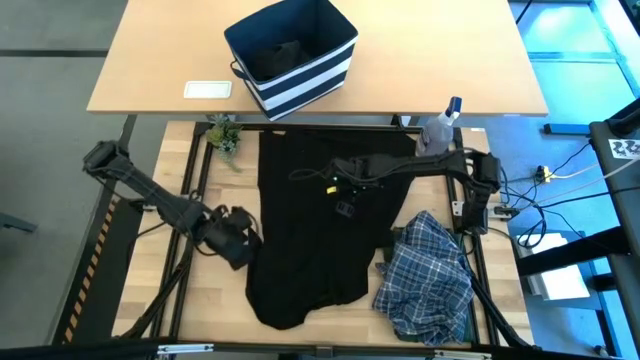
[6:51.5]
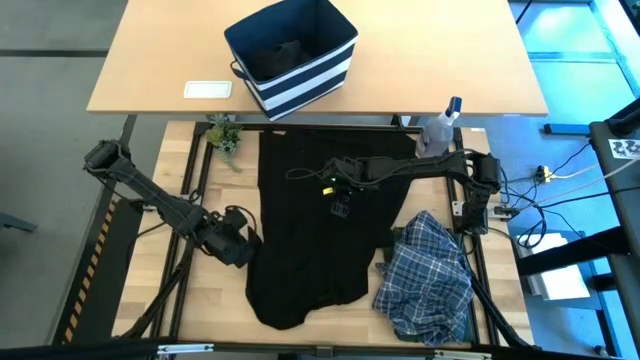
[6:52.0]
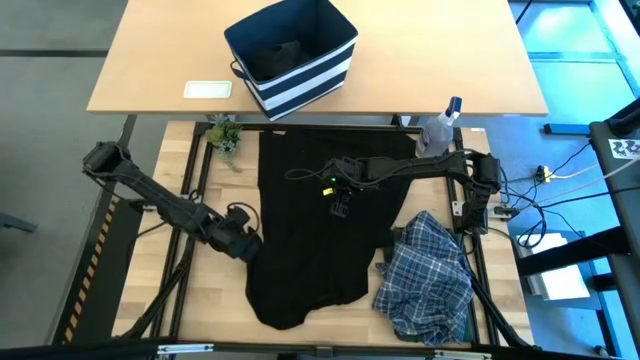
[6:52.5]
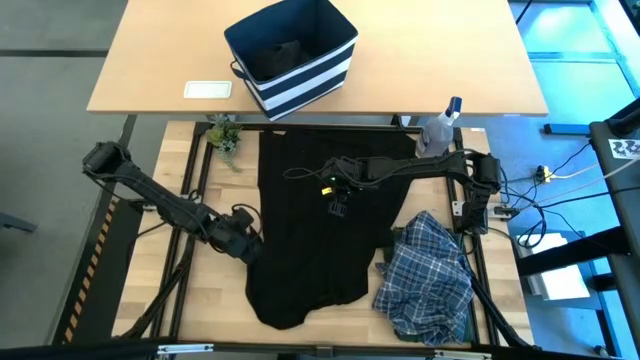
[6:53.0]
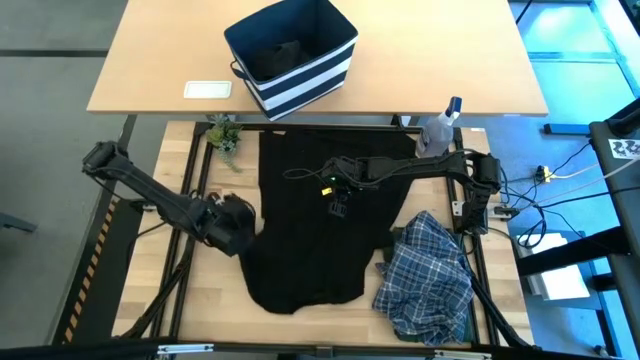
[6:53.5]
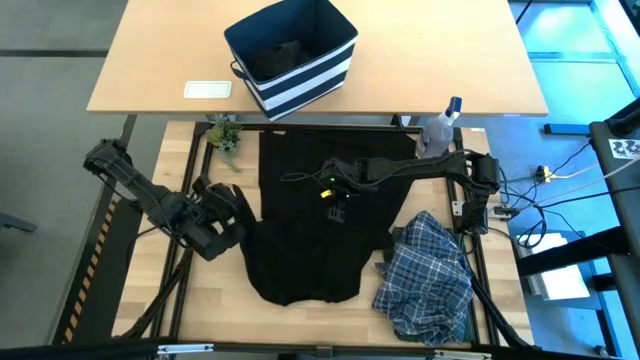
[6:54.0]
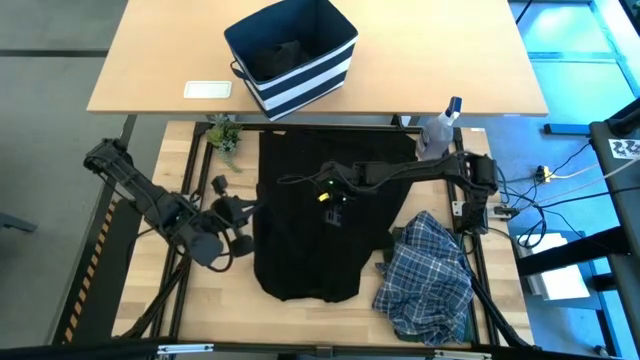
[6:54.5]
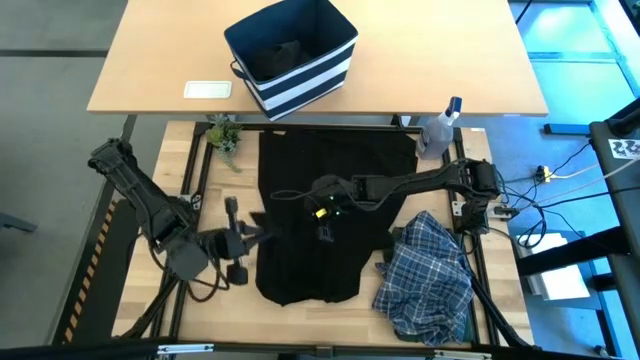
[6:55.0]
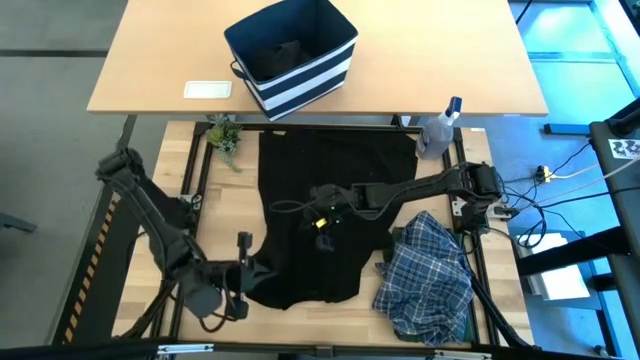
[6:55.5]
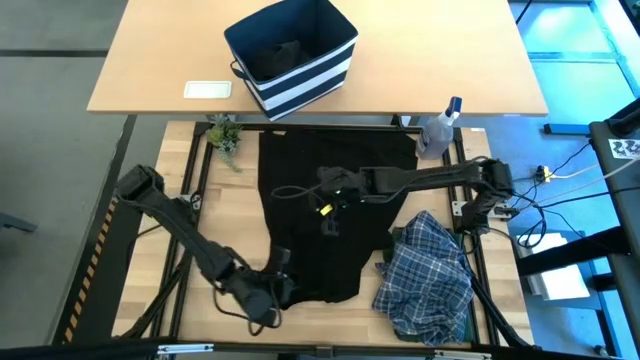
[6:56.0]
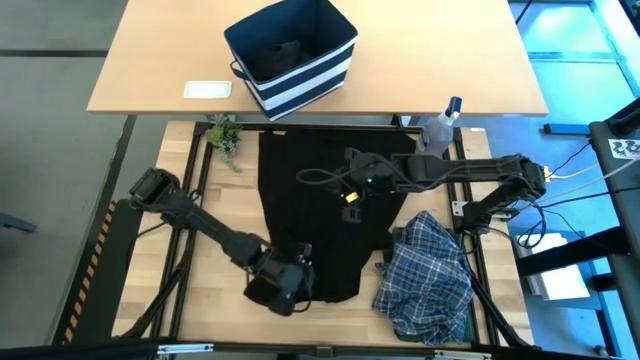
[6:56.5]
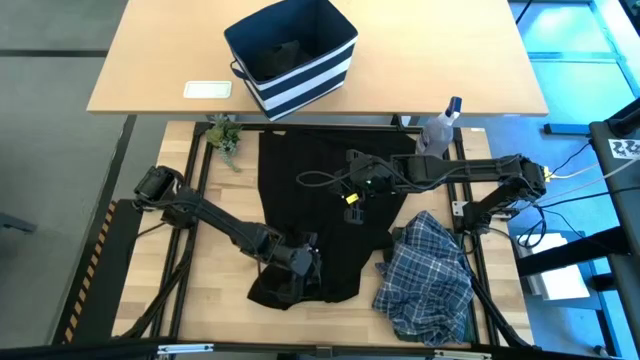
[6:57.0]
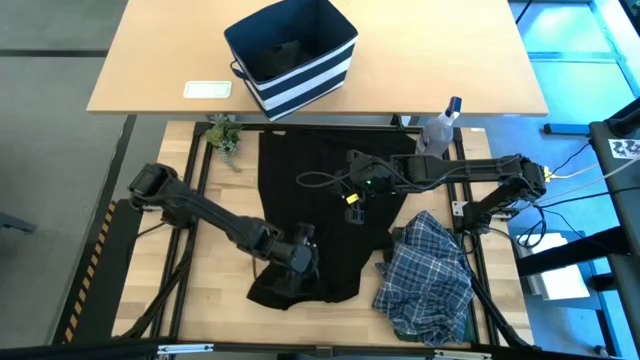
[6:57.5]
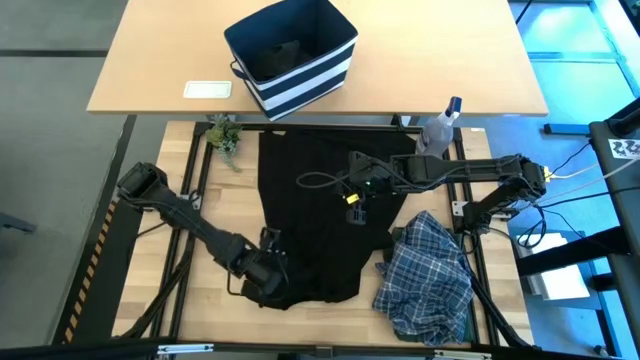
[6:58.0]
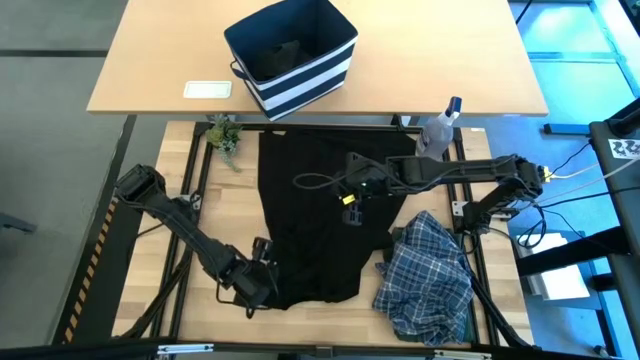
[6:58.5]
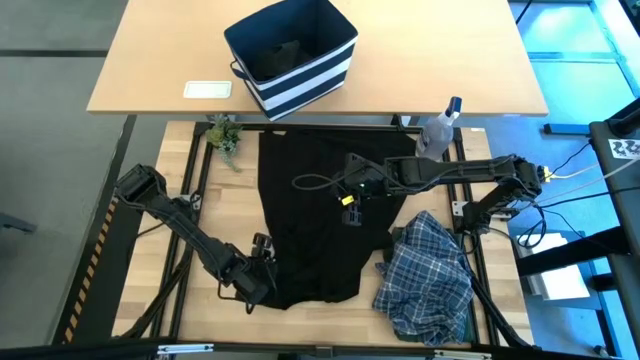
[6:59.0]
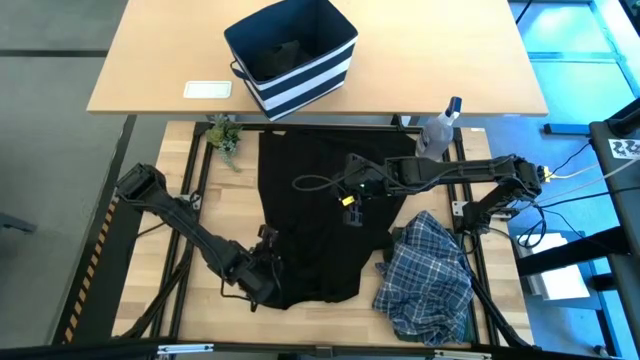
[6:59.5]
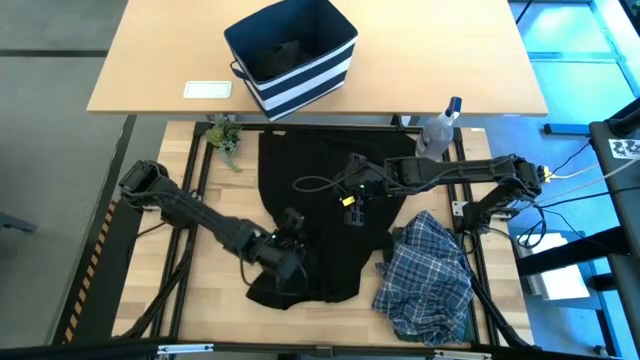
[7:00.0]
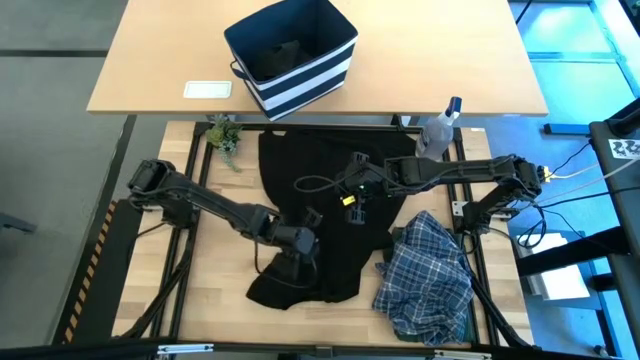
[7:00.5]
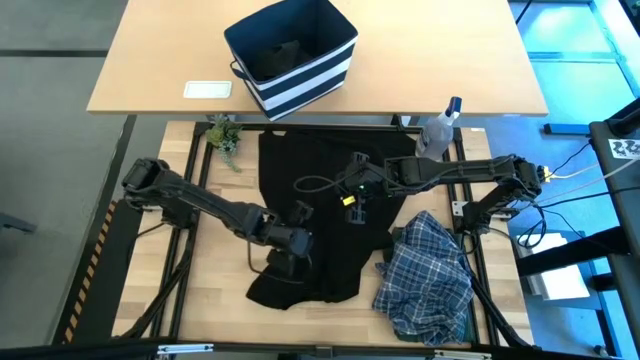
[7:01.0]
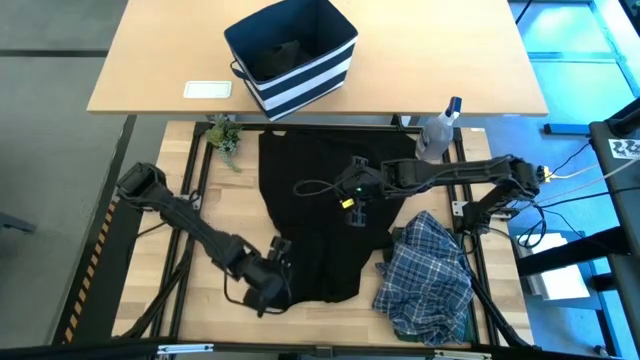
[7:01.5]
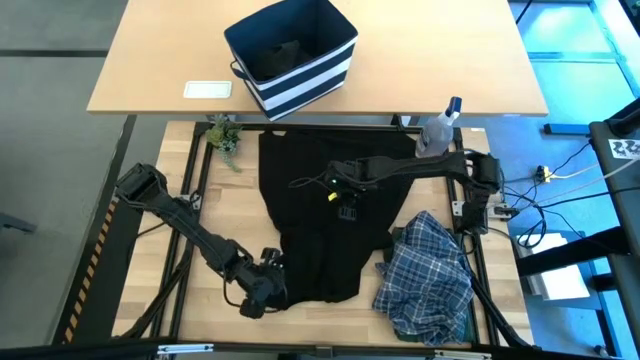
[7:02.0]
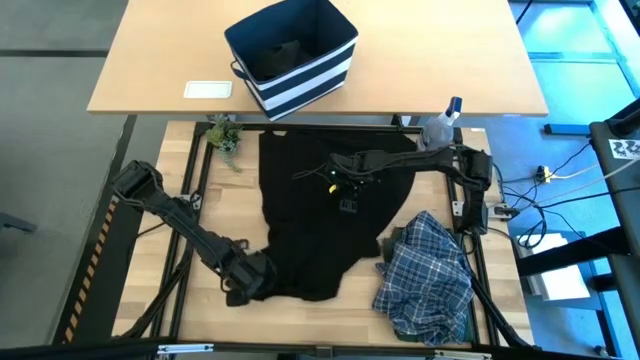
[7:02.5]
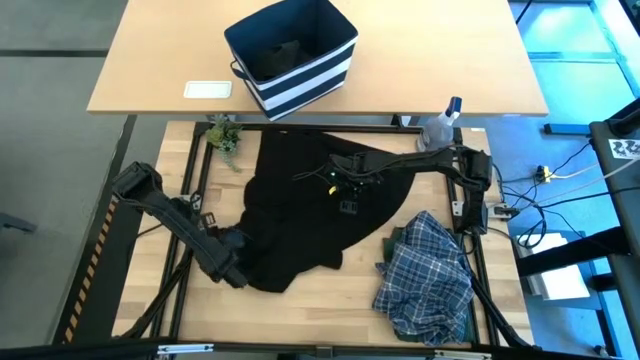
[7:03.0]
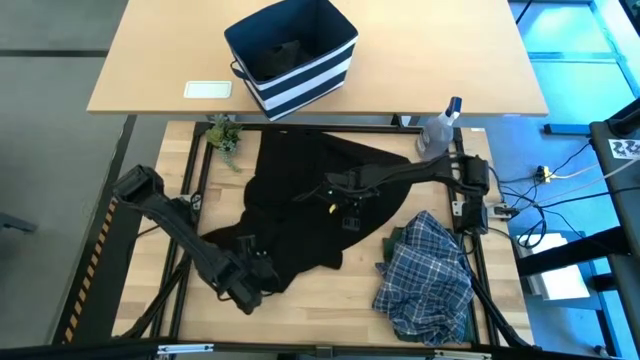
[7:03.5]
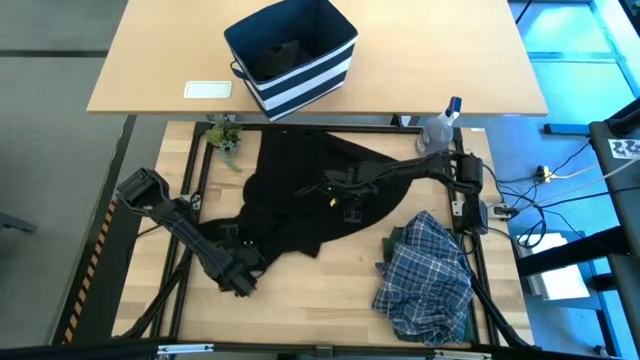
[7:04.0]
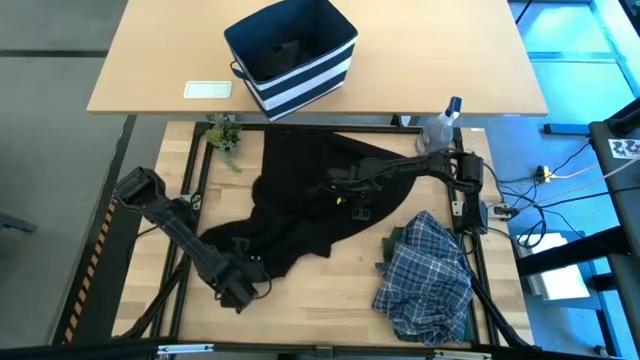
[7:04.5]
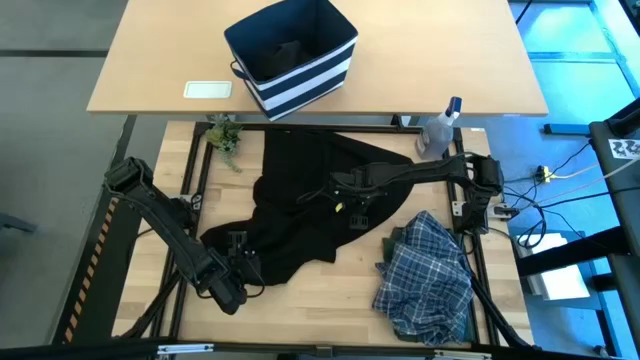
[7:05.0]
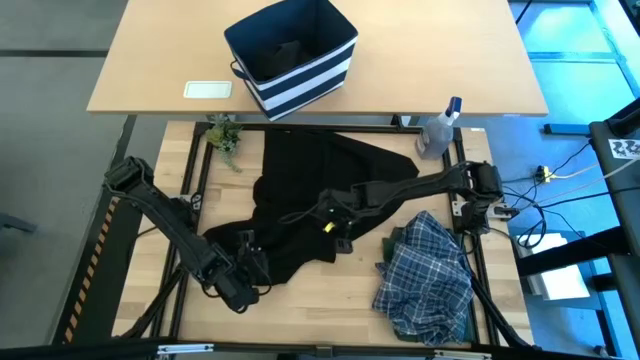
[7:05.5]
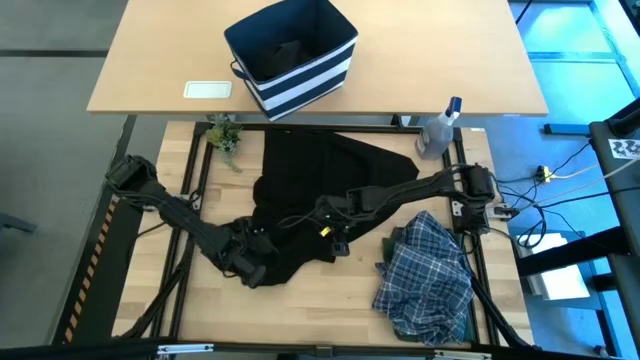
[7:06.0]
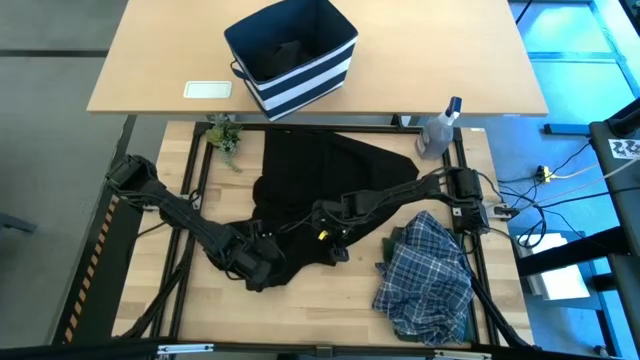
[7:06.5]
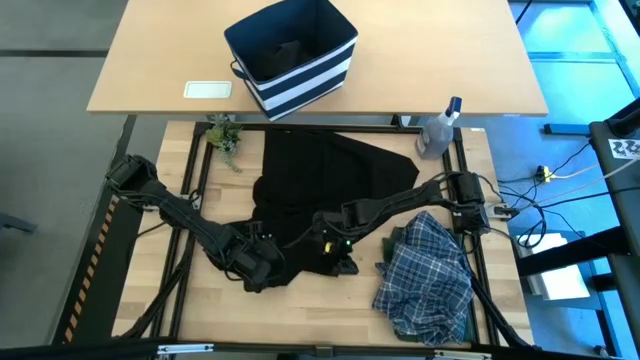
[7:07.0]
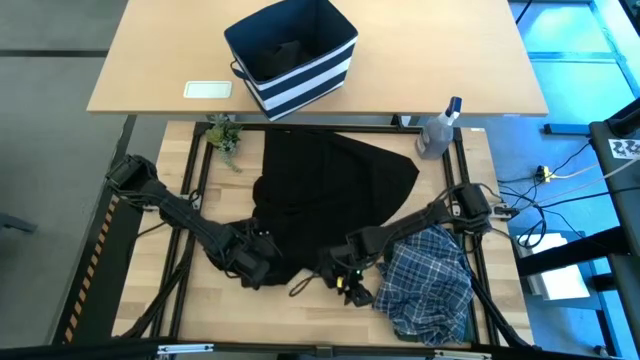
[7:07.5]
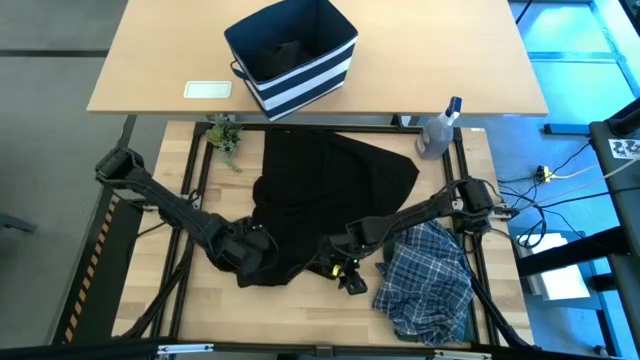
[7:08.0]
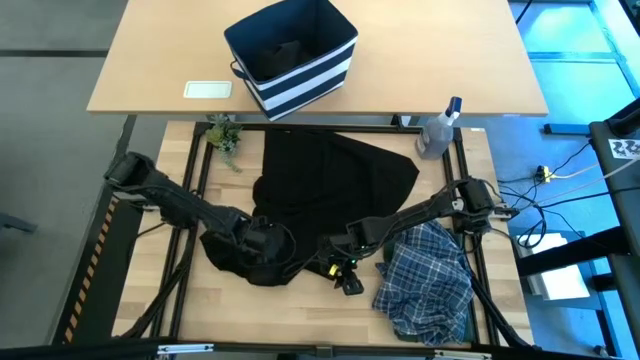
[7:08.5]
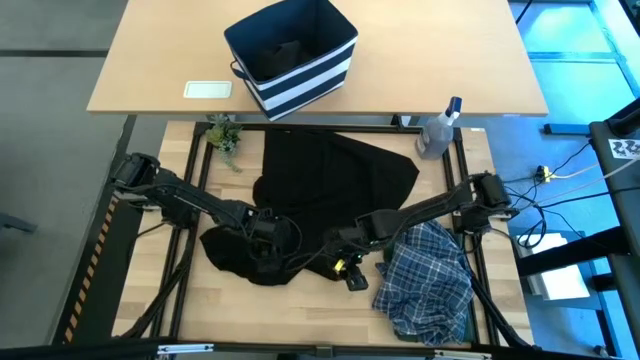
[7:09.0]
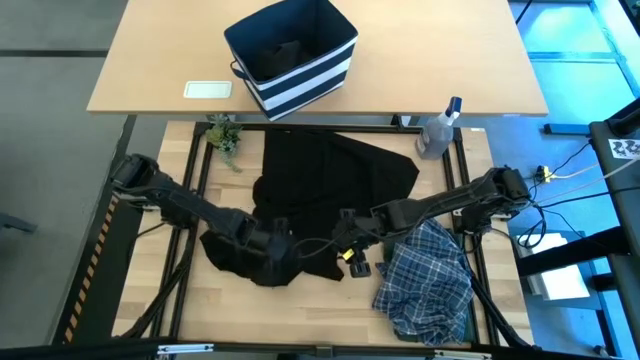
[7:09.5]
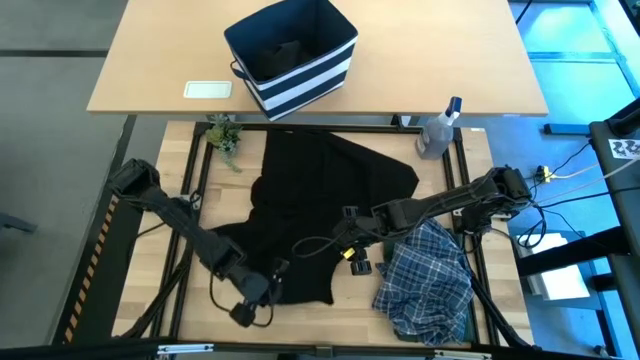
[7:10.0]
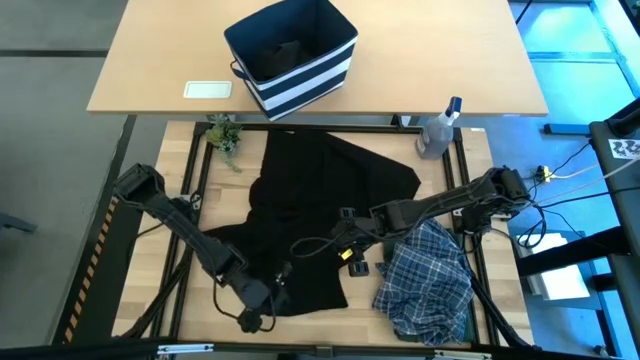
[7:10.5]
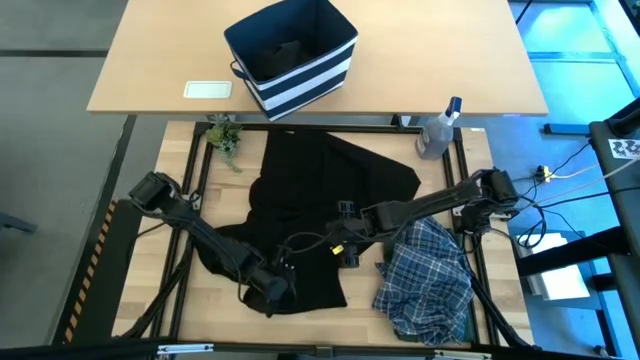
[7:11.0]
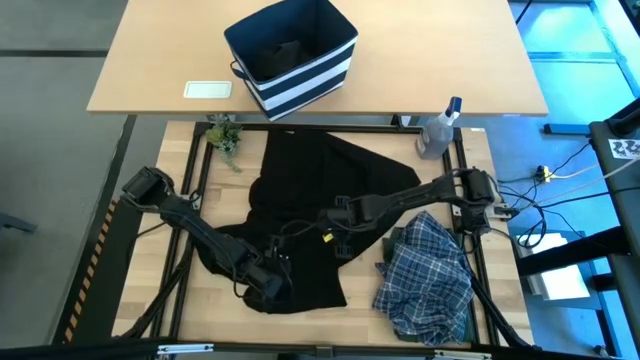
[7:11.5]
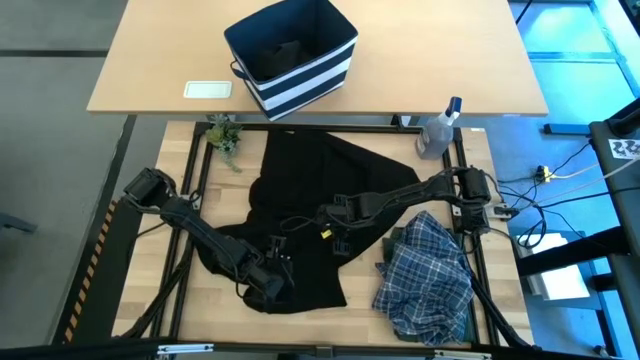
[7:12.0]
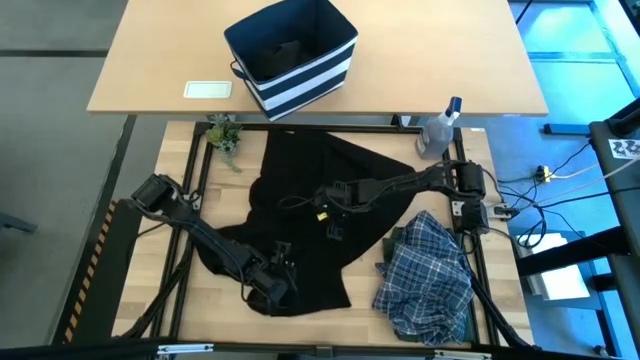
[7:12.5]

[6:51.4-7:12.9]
Task: Fold Laundry from Bin
Fold the black shirt
